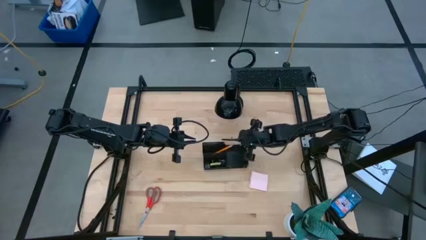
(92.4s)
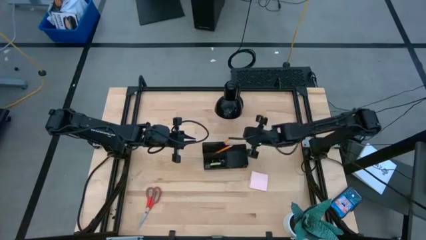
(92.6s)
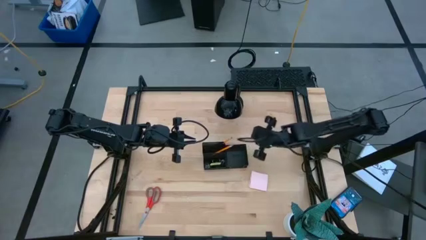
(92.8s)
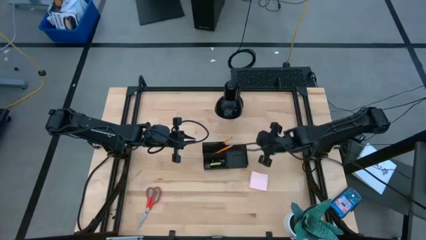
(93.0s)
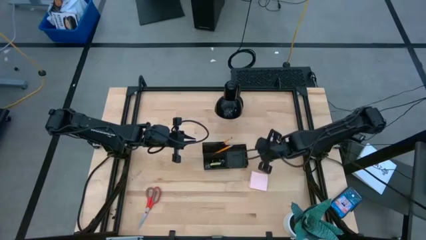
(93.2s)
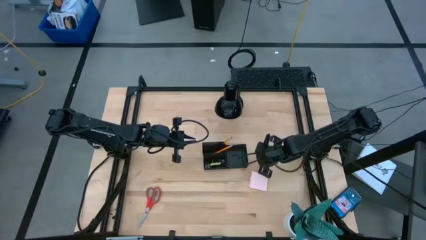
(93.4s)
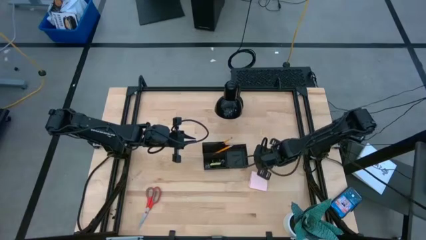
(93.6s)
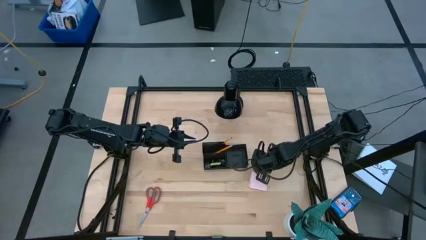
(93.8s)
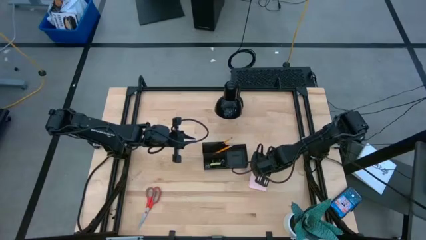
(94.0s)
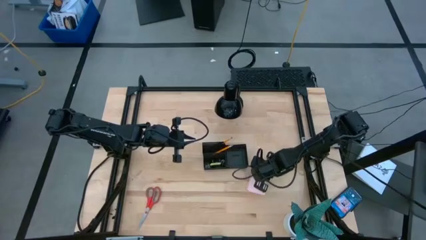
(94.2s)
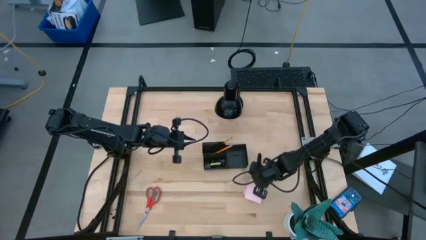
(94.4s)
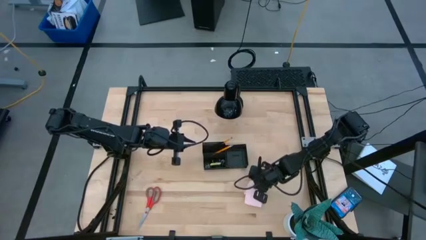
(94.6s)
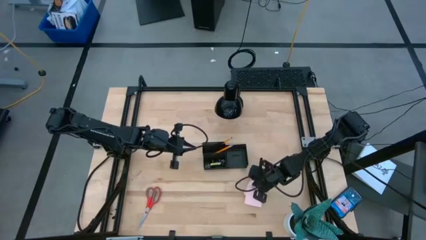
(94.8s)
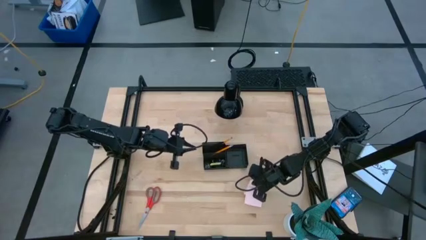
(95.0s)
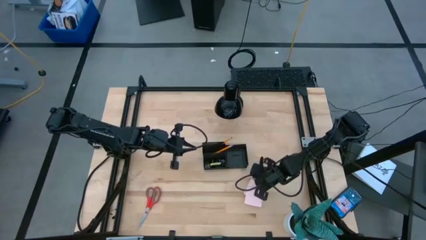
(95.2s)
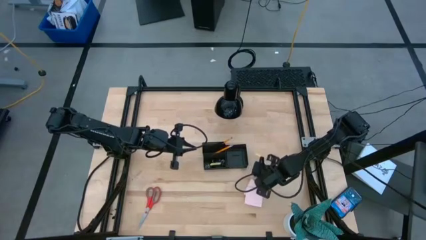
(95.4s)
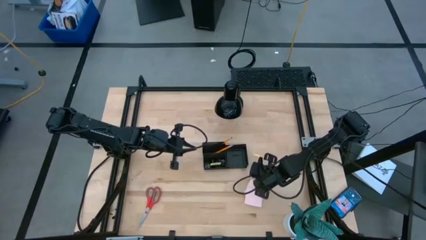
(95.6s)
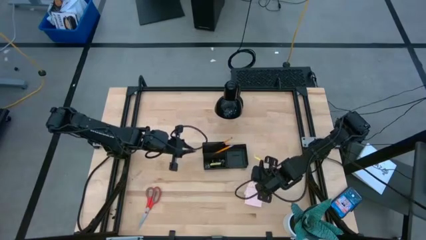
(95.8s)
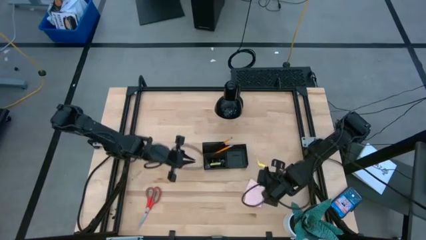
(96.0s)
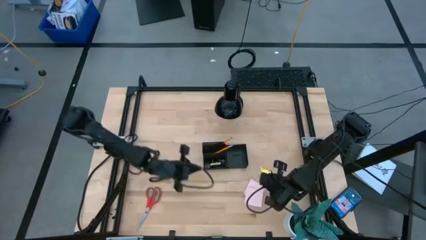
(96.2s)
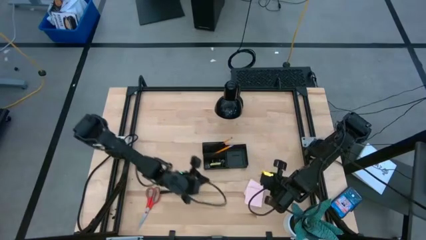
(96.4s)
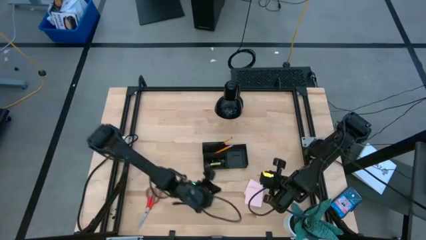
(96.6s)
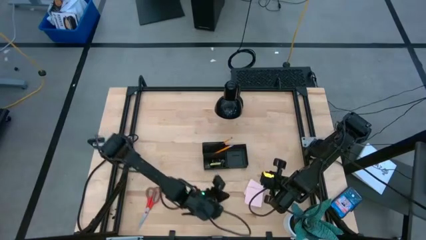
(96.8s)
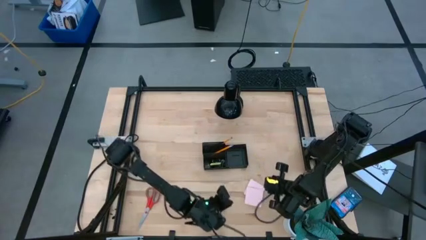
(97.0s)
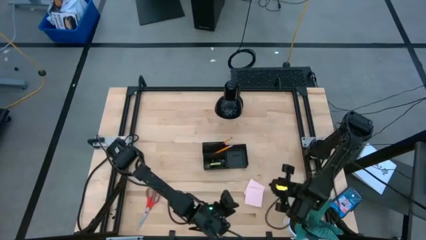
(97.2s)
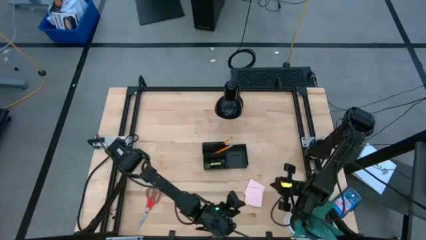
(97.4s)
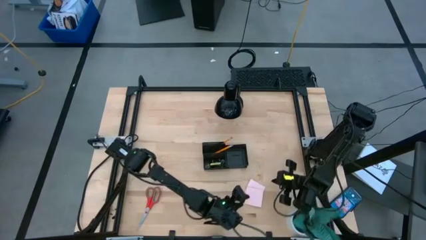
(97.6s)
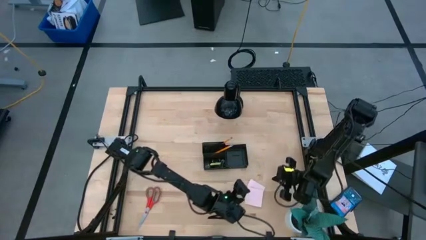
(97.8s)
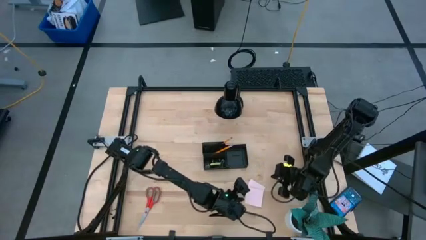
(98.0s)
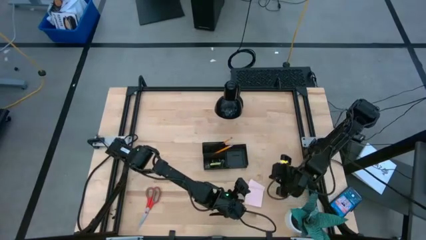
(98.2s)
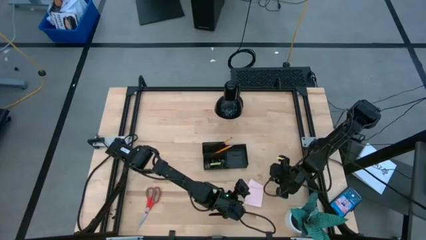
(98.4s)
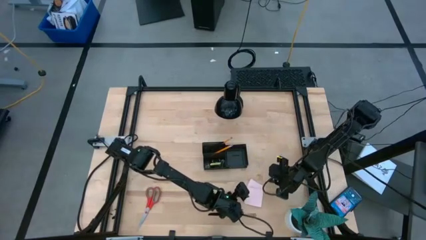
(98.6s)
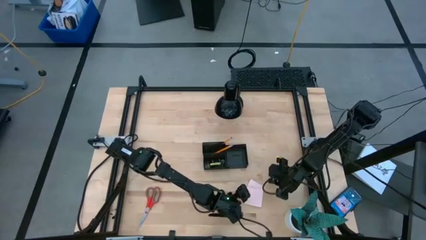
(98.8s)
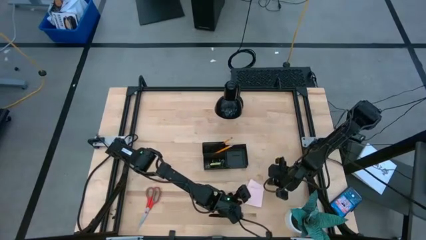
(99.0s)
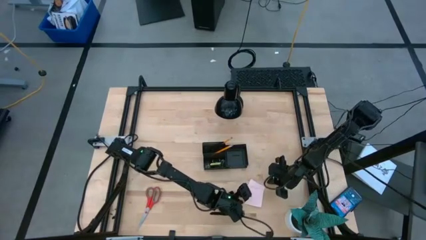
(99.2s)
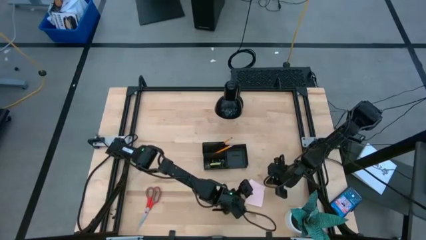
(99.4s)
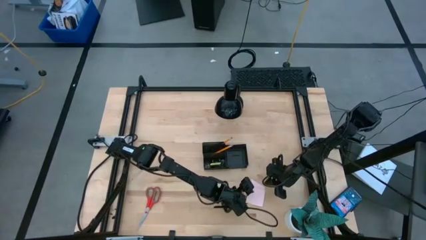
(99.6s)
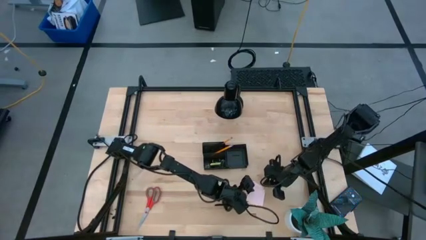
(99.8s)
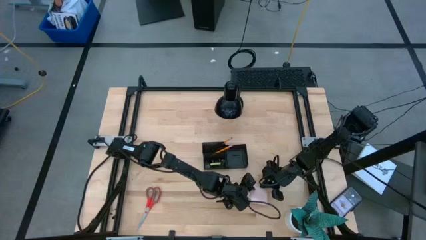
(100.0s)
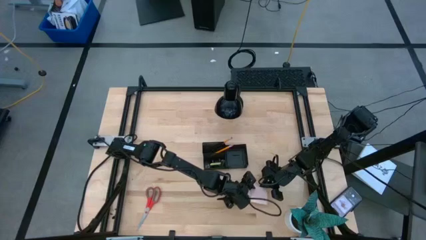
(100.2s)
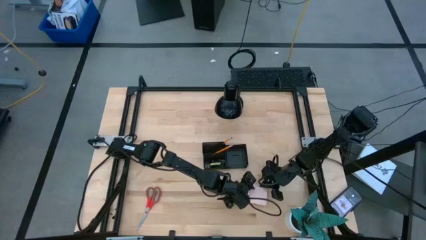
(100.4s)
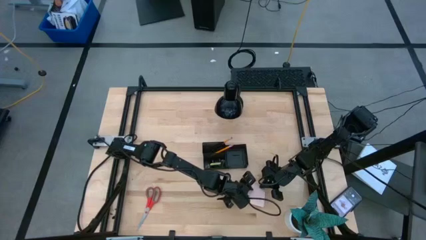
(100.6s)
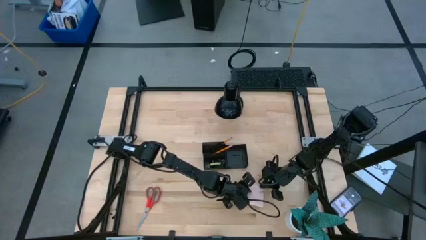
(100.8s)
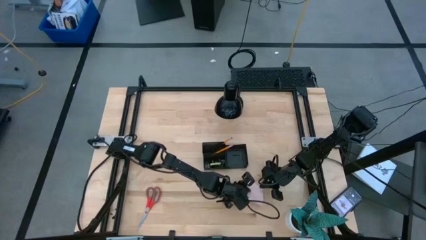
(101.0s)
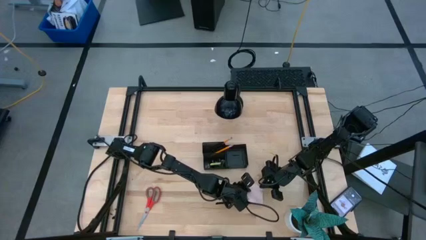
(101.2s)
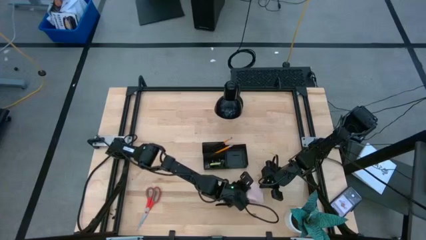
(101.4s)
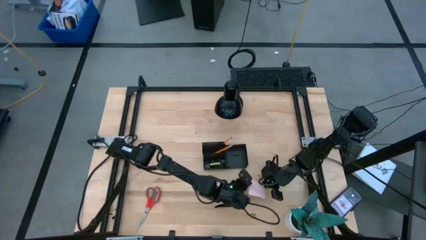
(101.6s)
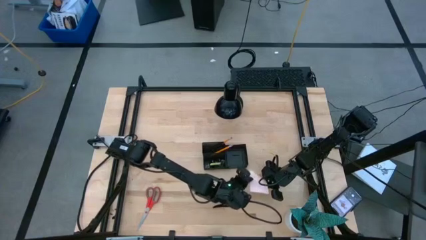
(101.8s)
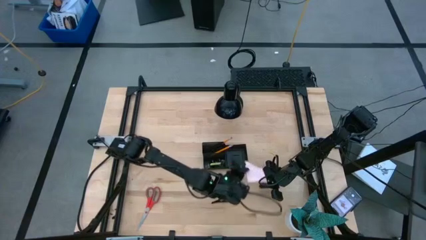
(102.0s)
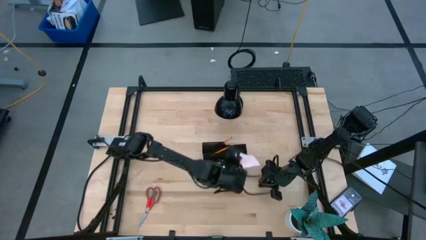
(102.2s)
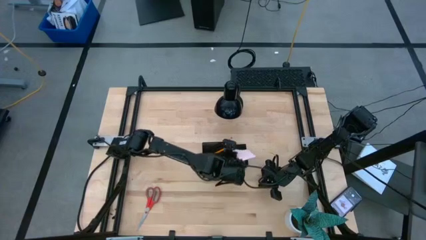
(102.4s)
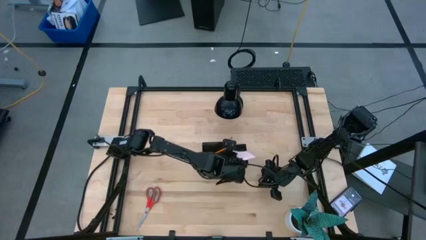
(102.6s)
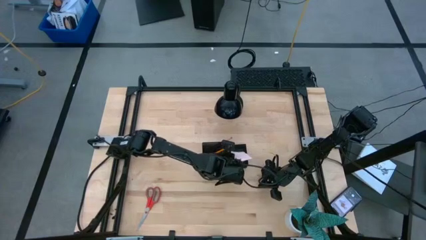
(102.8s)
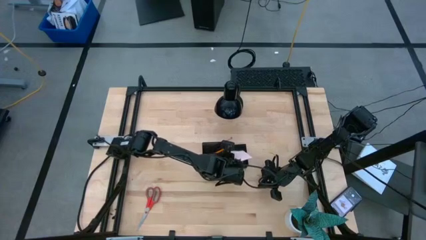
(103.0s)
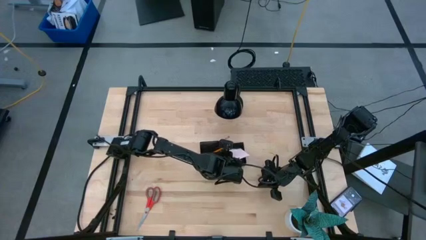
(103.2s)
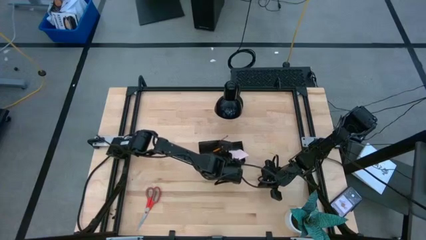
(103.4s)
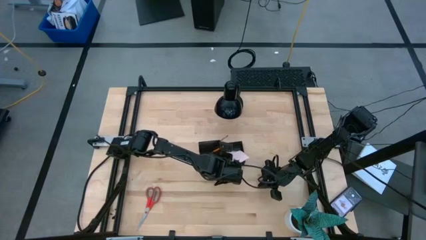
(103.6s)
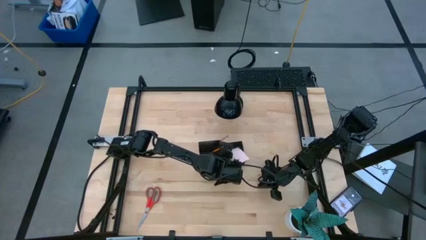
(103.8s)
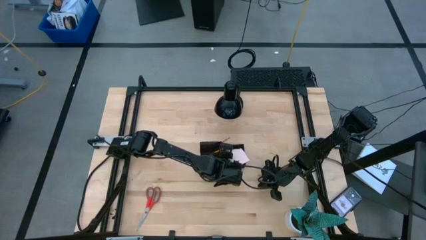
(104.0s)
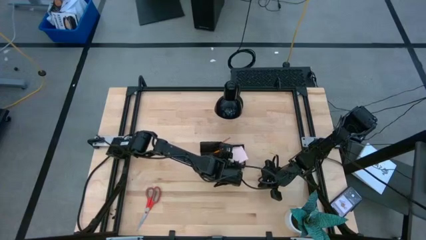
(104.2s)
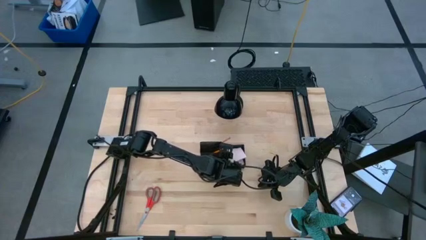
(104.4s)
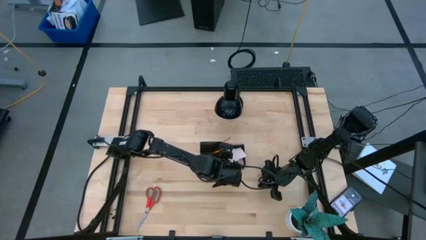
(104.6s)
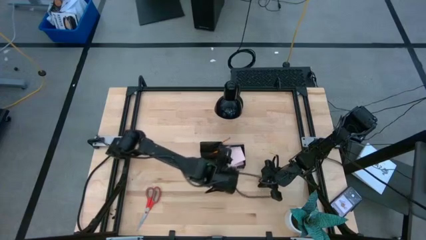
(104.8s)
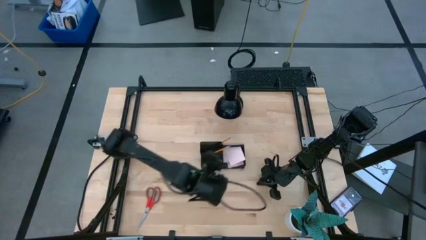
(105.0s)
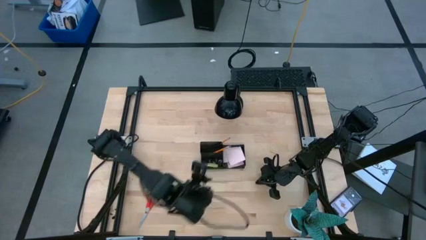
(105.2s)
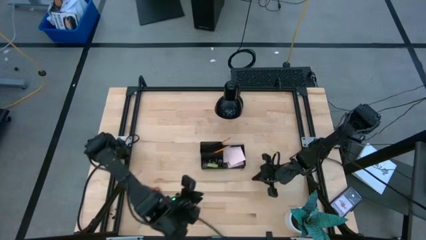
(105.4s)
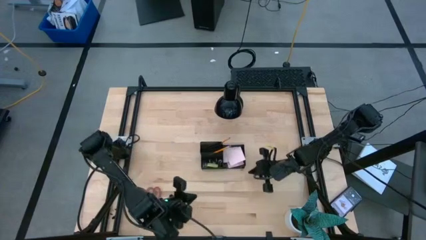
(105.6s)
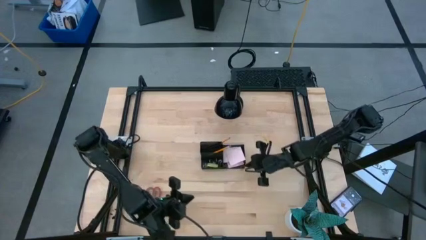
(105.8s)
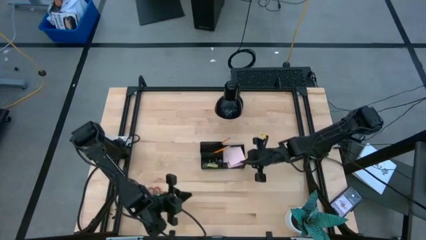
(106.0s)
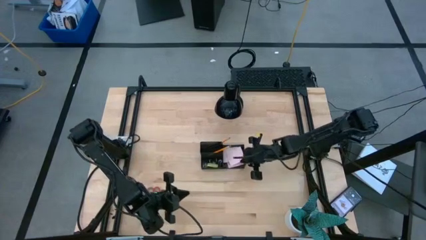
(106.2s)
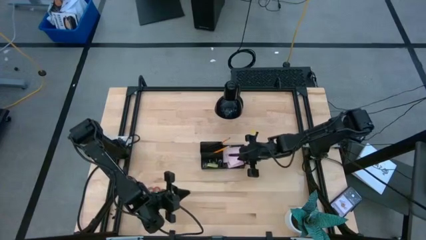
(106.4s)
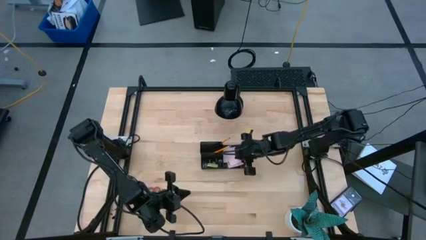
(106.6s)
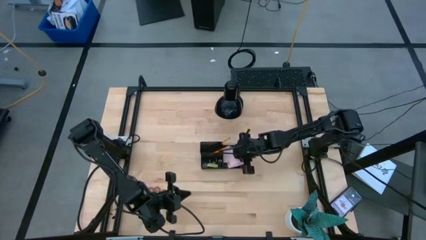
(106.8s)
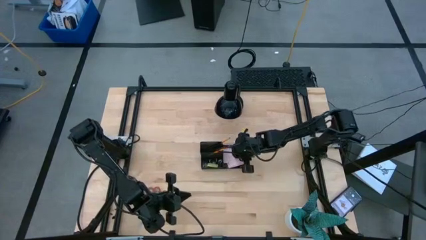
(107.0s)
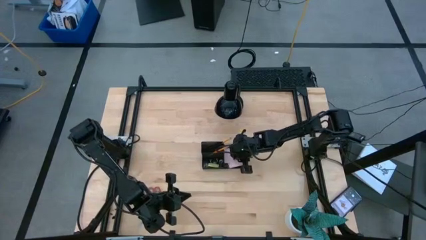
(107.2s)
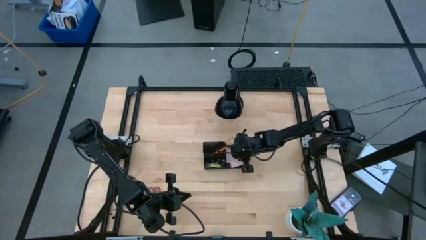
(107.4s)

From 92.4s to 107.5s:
Task: Pick and place office supplies into organizer
Put the pink sticky note into the black desk organizer

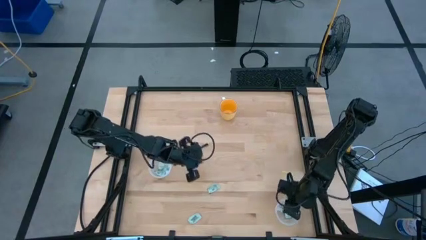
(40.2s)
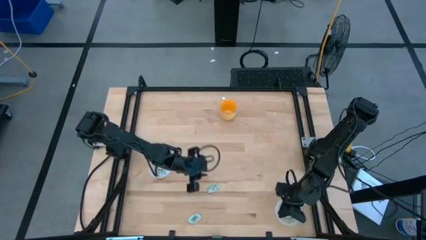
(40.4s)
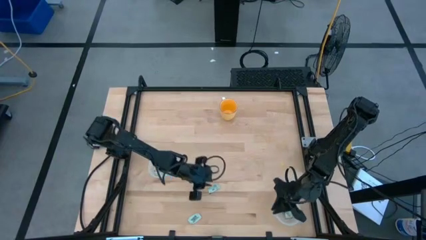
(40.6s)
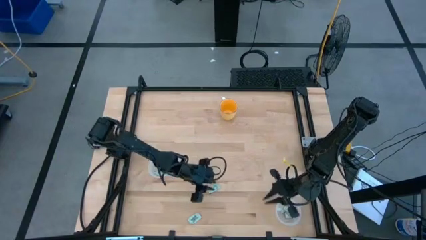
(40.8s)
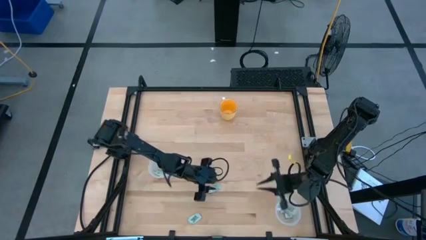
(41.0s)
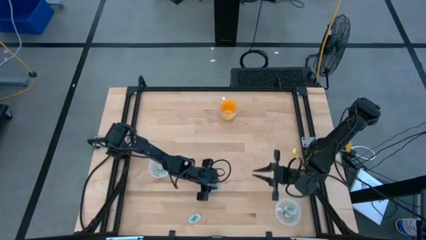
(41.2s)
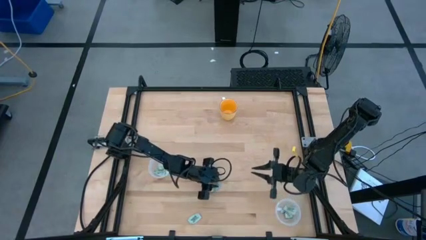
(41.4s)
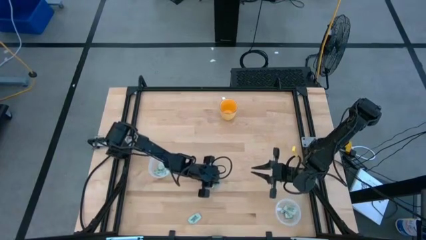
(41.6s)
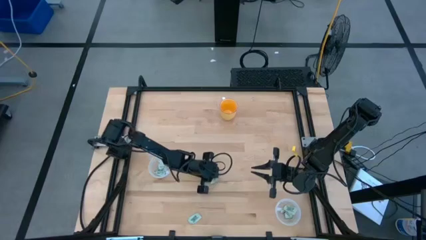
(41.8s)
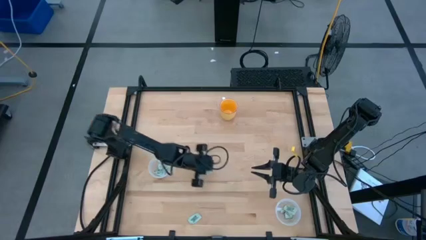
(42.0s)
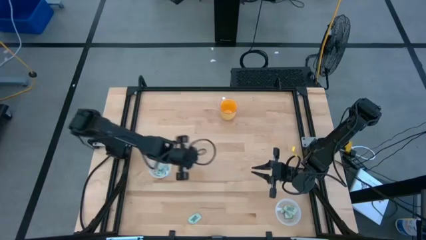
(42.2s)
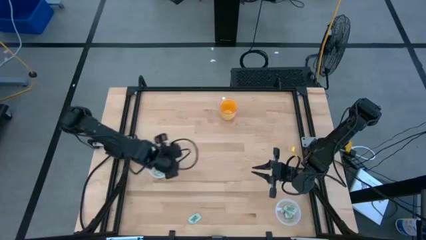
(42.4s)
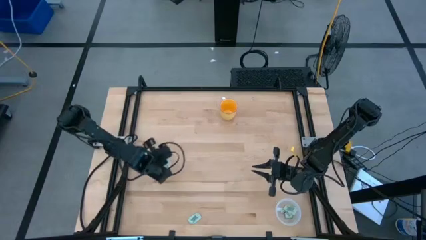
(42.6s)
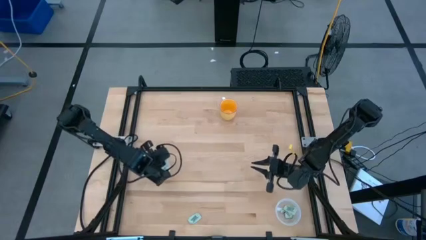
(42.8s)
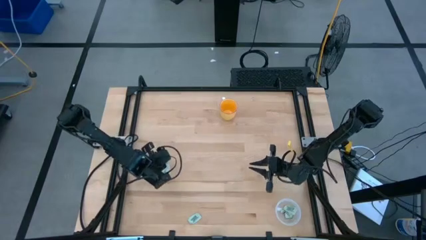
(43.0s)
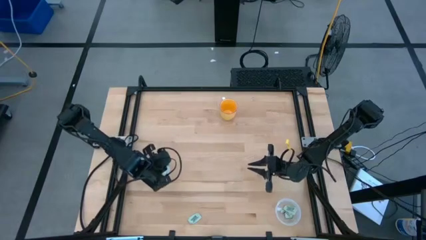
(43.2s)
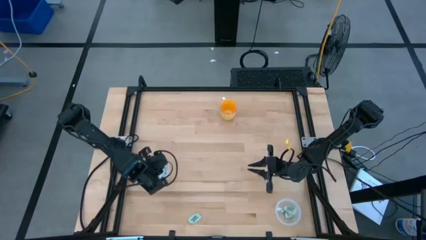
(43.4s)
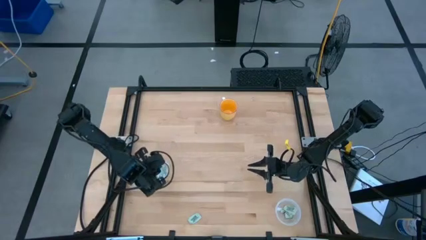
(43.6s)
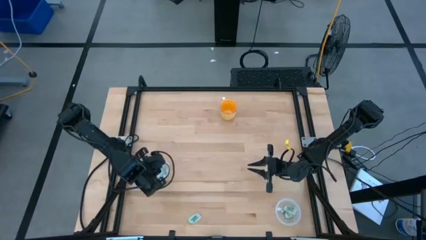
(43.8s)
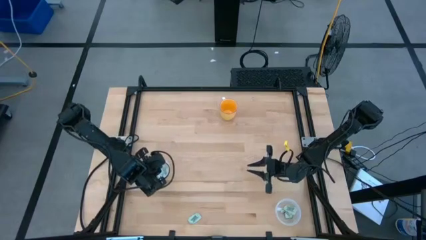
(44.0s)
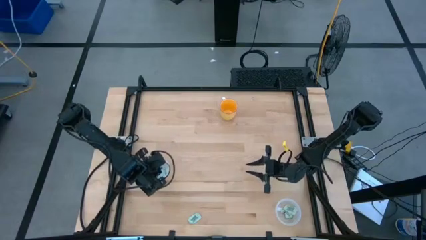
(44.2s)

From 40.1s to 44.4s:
Task: Pick and place Stevia / Truvia into bins
Put the top light green stevia packet into the left transparent container
